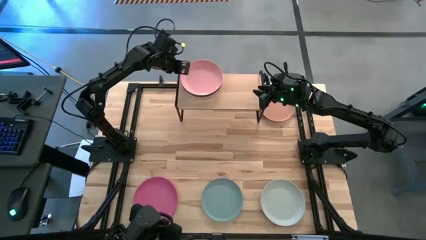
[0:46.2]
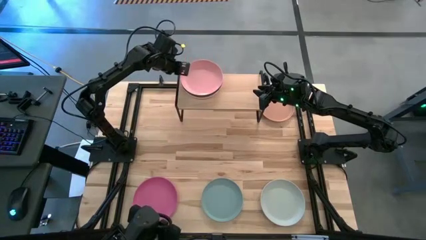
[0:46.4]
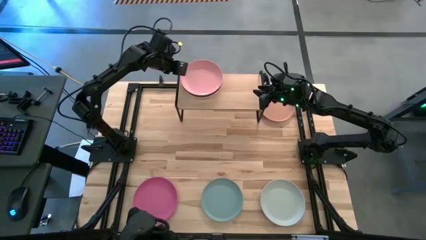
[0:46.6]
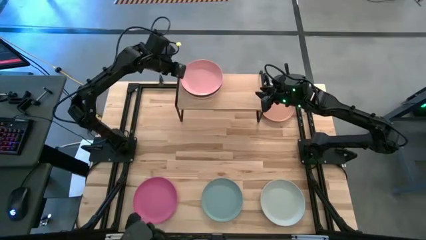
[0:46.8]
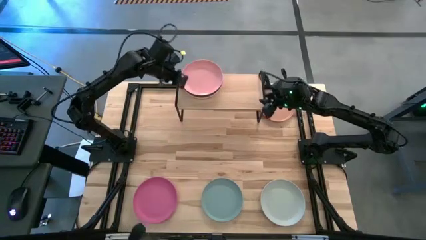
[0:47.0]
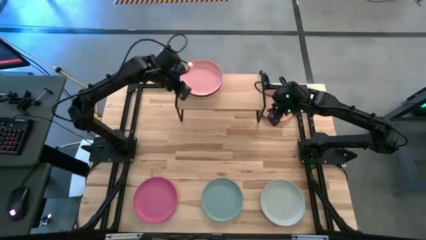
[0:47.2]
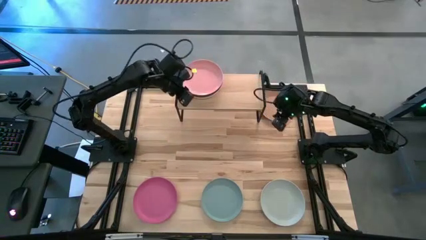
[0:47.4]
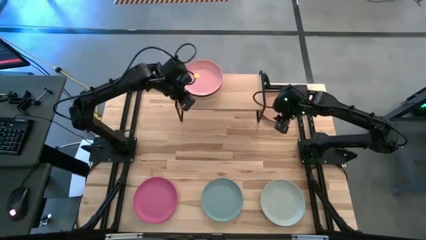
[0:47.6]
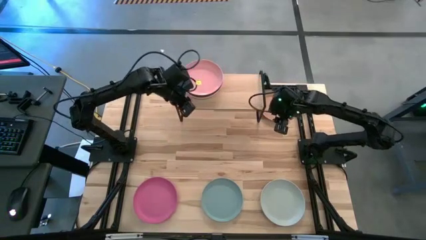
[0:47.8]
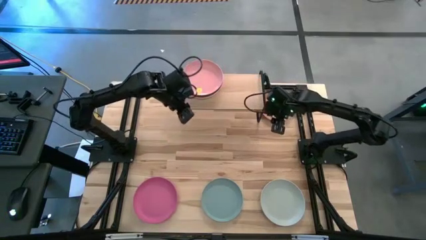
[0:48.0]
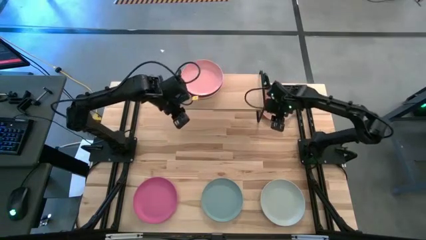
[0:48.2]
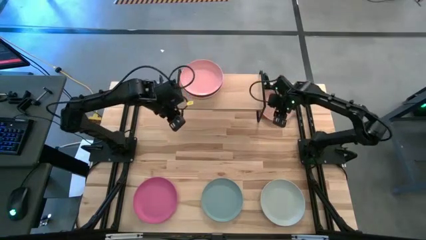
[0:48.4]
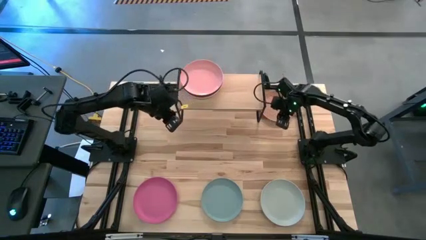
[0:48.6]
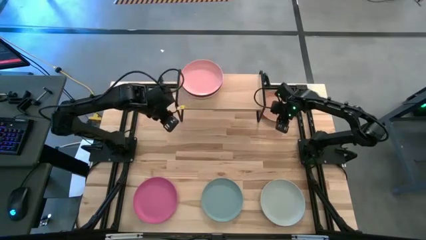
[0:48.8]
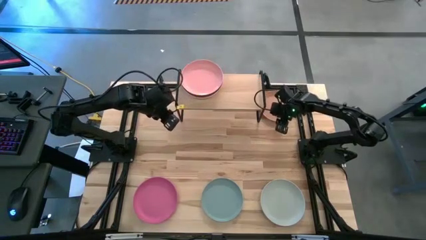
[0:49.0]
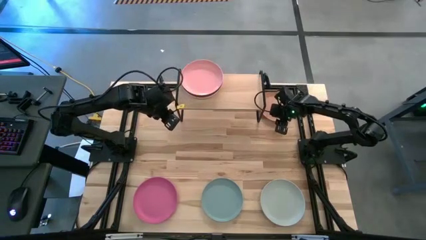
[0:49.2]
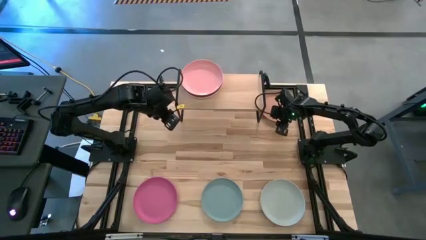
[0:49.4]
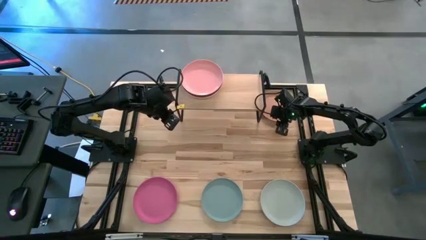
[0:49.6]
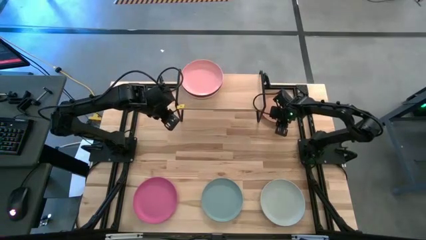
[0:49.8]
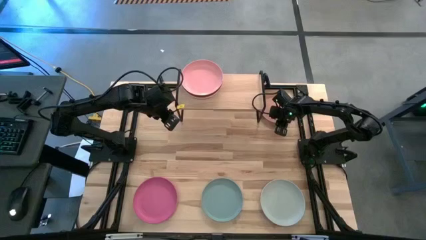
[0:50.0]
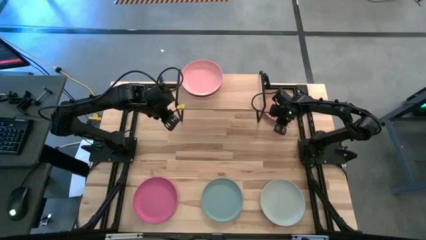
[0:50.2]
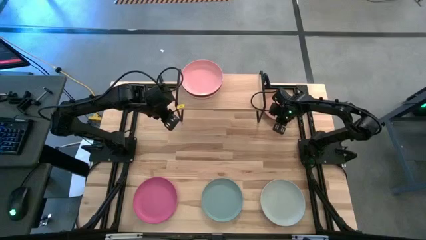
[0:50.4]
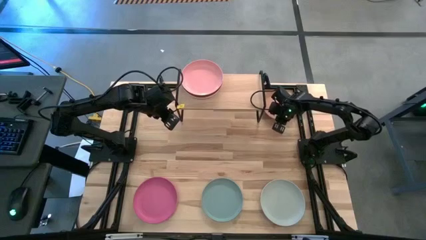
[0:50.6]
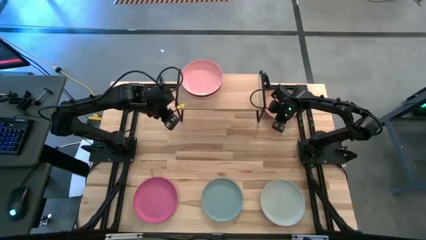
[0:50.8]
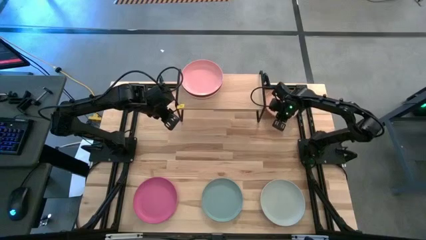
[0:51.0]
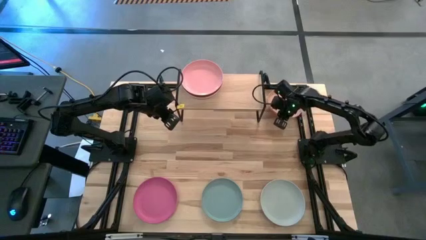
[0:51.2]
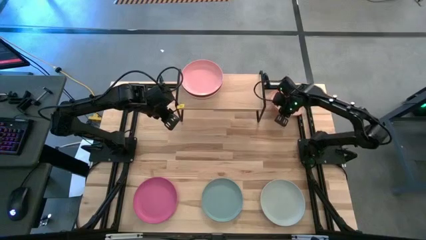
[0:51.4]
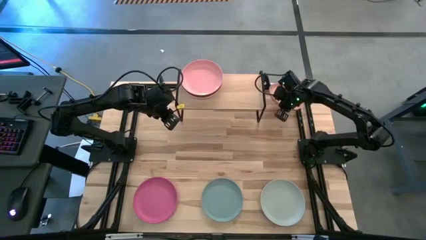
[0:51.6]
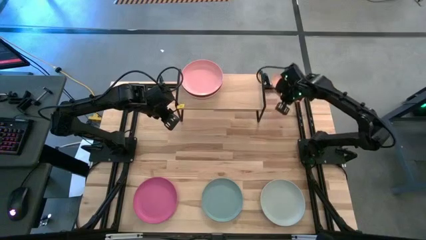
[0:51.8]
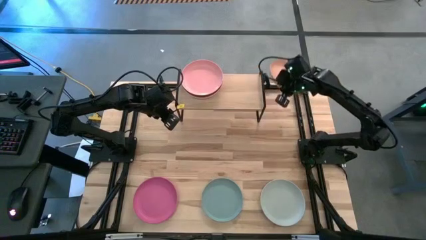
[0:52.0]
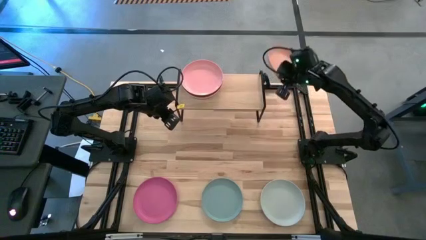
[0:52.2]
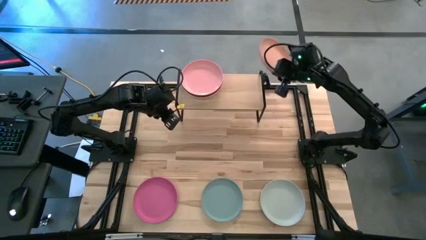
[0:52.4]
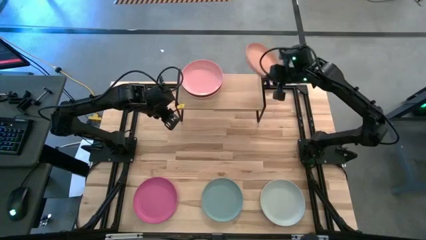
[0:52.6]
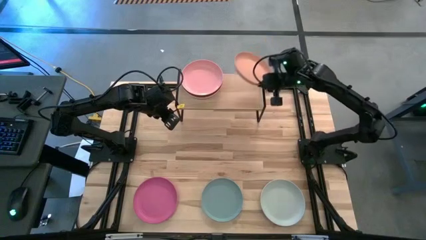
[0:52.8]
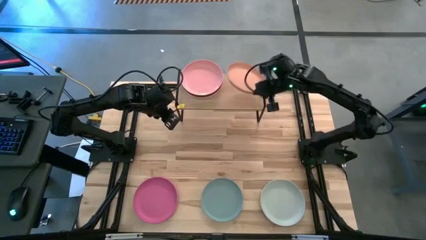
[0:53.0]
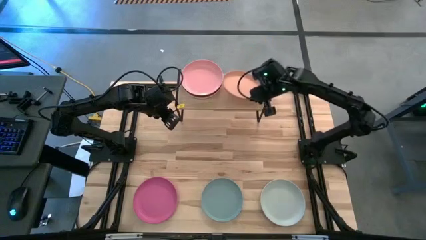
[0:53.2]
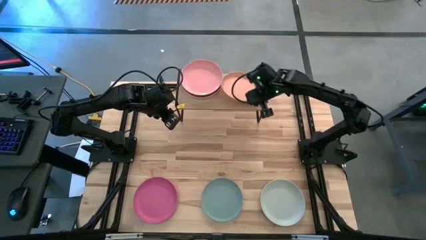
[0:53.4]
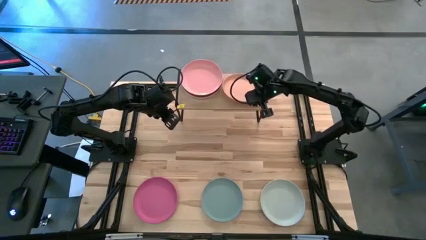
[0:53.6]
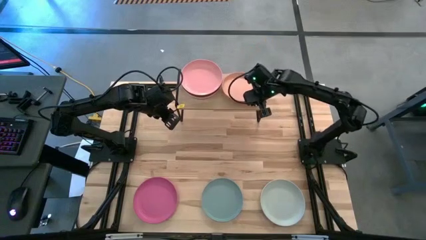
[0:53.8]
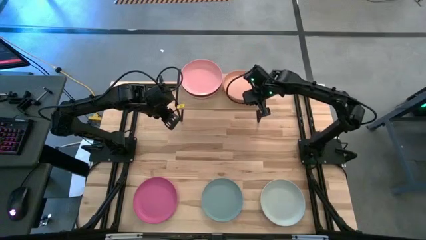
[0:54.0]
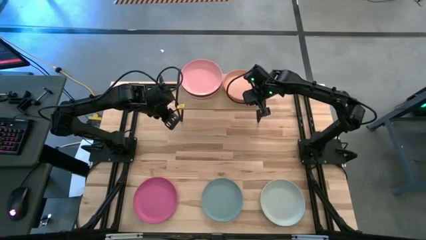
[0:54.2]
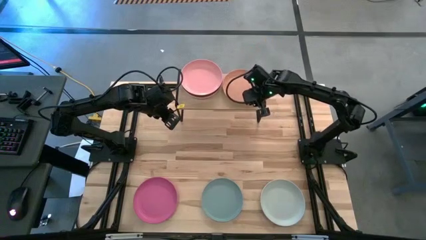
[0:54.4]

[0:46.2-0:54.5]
Task: Place and stack plates onto a shelf
Put the brown plate on the shelf

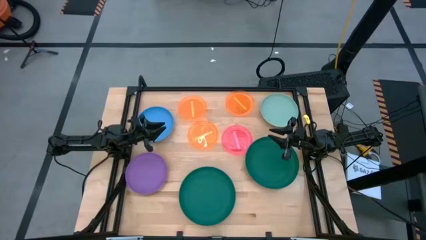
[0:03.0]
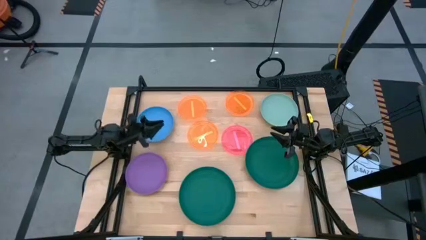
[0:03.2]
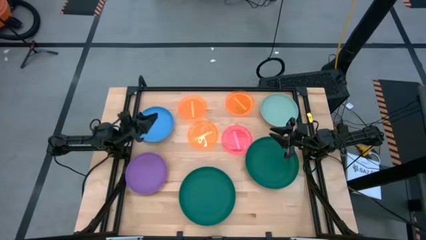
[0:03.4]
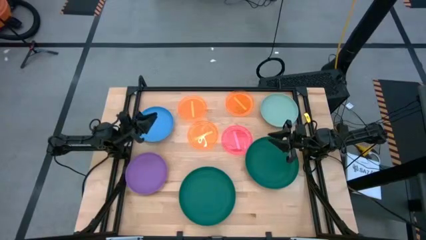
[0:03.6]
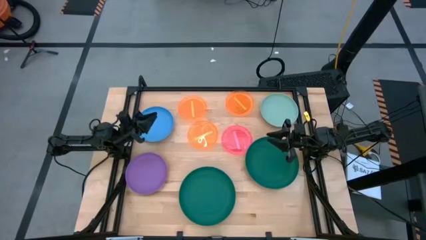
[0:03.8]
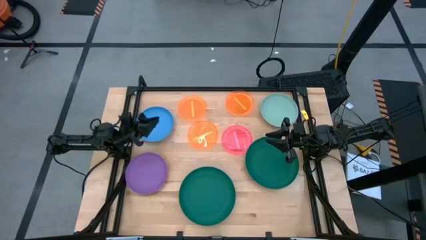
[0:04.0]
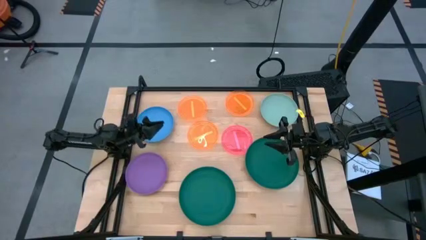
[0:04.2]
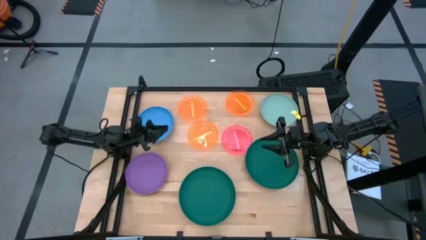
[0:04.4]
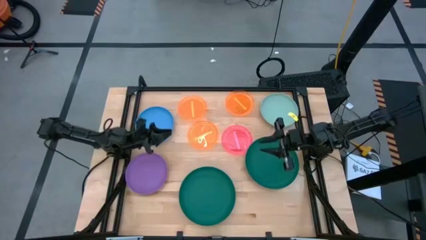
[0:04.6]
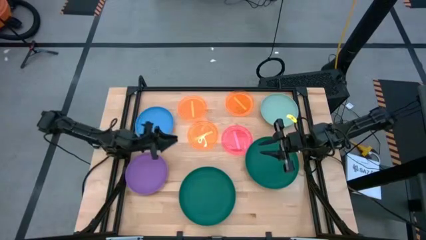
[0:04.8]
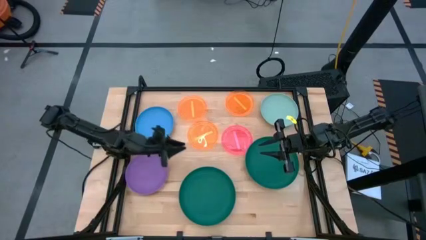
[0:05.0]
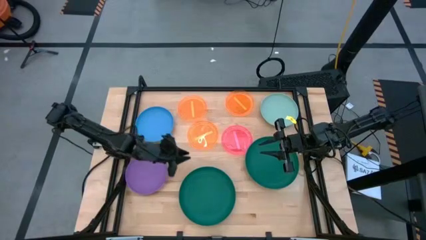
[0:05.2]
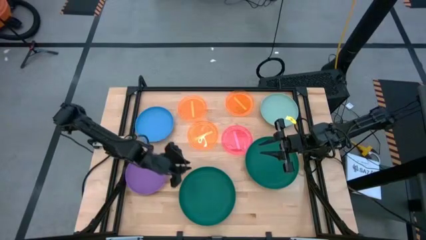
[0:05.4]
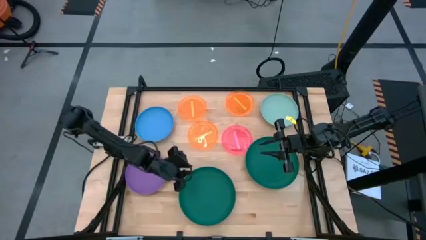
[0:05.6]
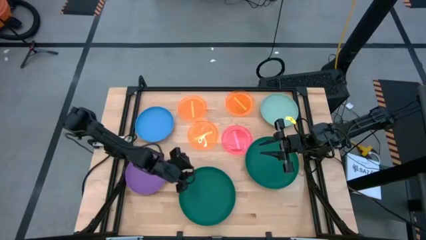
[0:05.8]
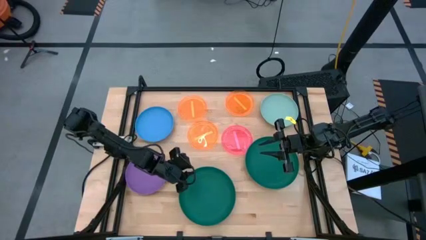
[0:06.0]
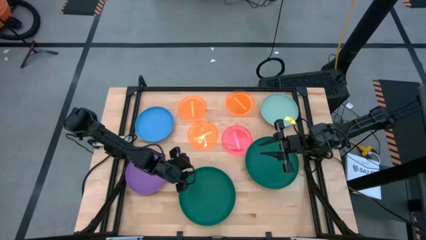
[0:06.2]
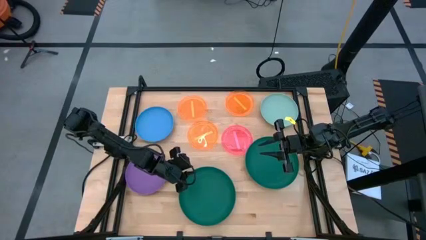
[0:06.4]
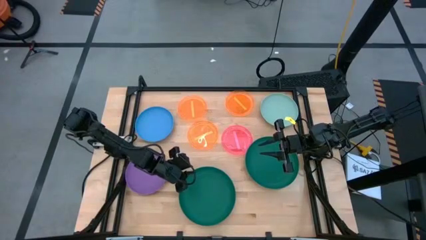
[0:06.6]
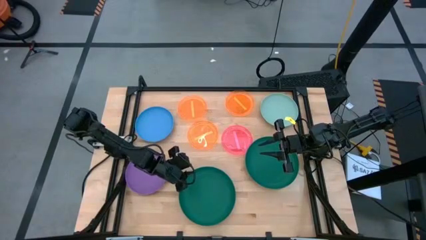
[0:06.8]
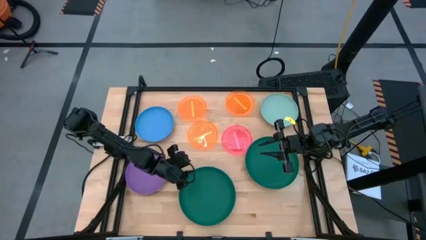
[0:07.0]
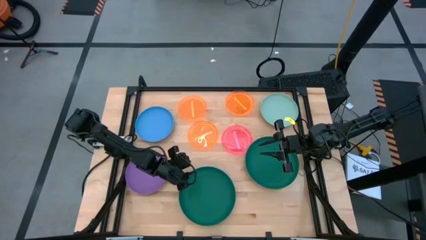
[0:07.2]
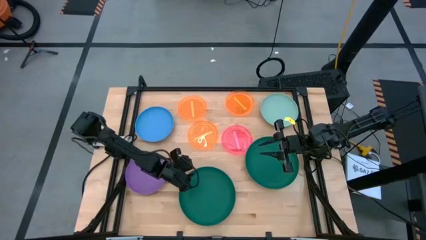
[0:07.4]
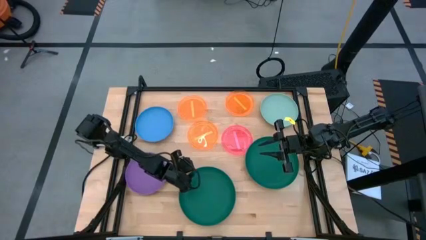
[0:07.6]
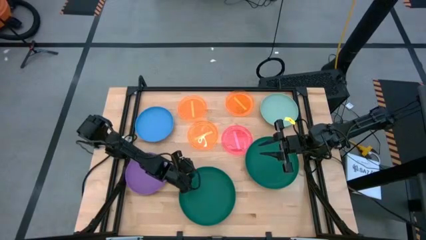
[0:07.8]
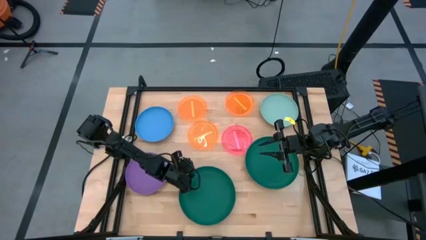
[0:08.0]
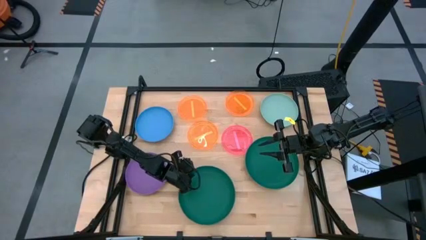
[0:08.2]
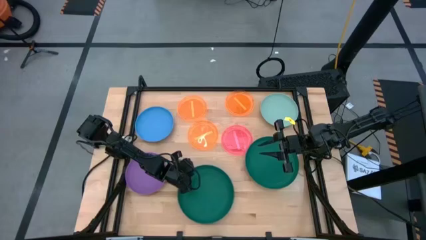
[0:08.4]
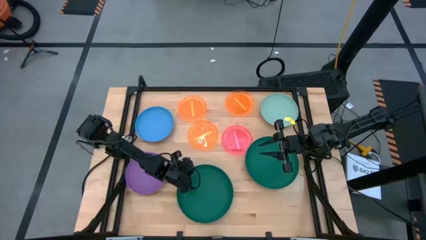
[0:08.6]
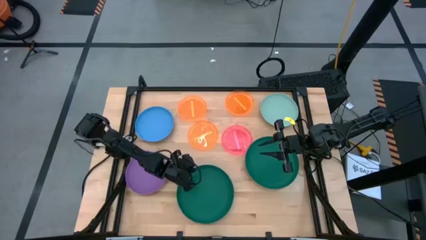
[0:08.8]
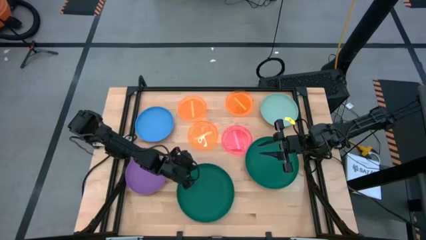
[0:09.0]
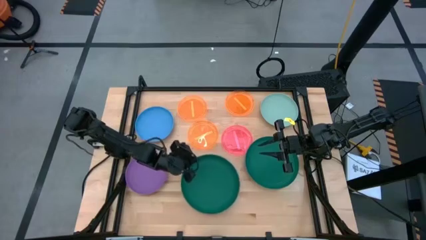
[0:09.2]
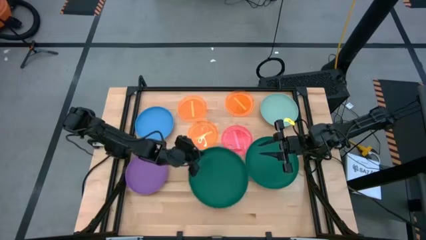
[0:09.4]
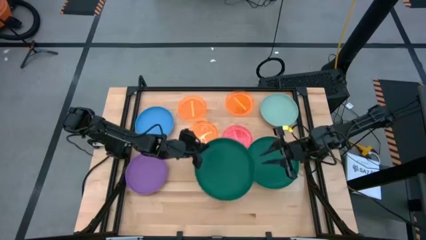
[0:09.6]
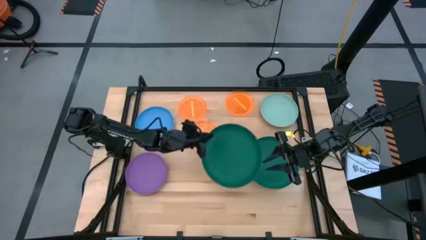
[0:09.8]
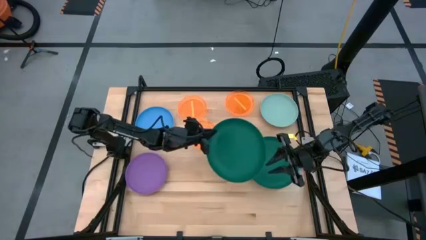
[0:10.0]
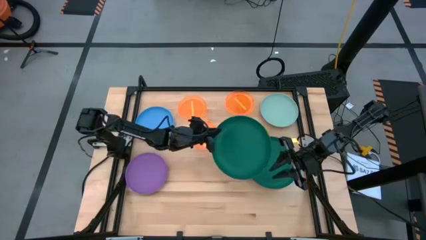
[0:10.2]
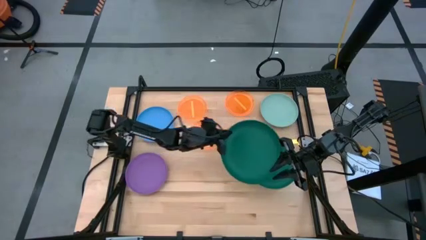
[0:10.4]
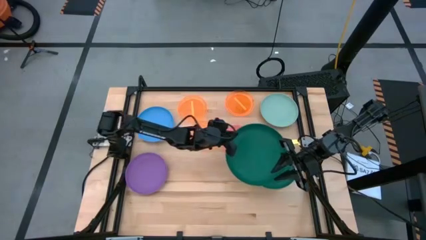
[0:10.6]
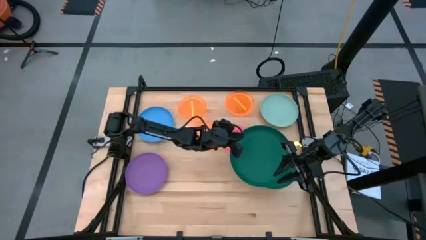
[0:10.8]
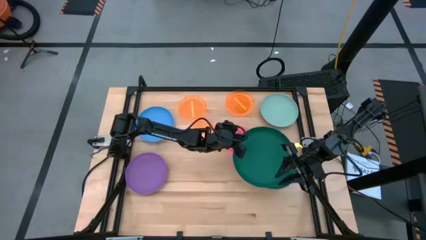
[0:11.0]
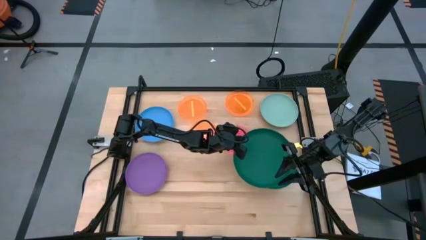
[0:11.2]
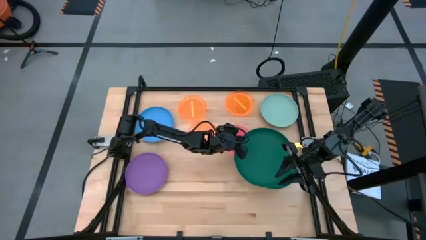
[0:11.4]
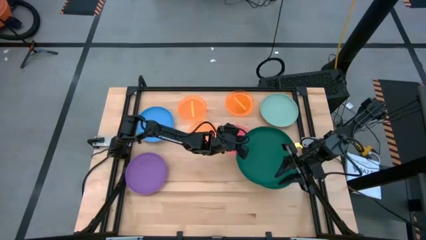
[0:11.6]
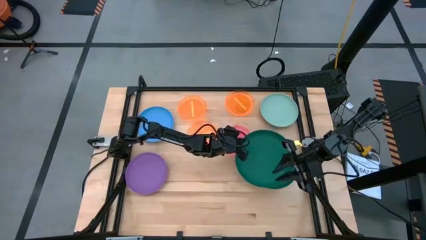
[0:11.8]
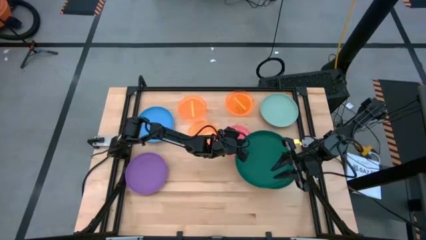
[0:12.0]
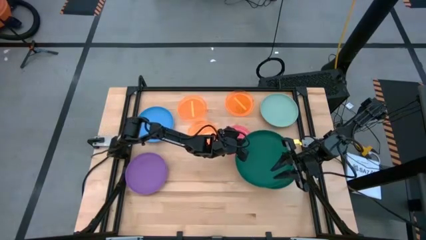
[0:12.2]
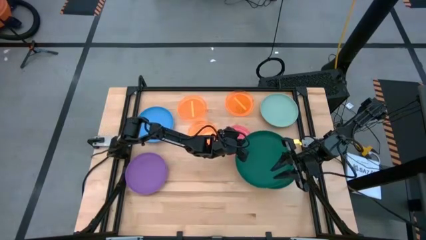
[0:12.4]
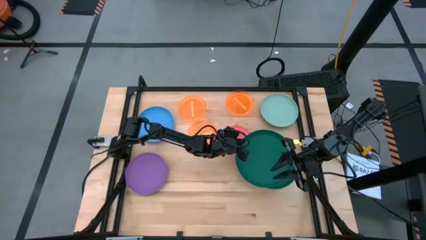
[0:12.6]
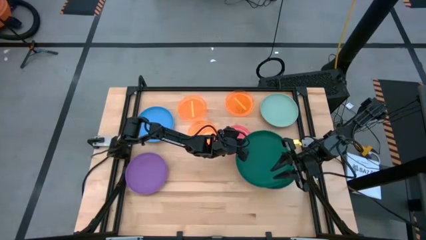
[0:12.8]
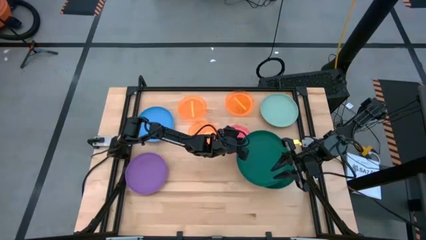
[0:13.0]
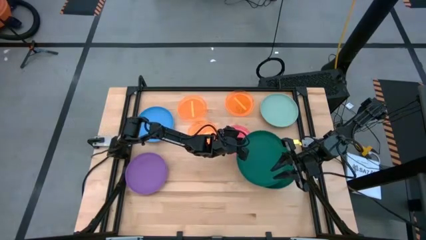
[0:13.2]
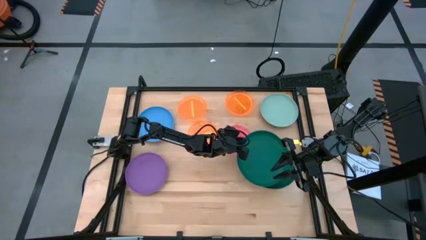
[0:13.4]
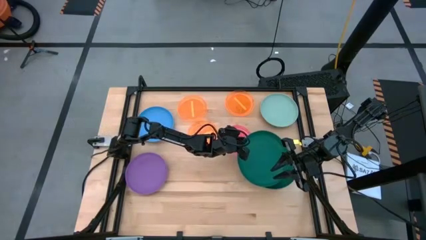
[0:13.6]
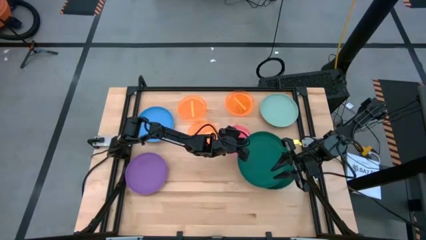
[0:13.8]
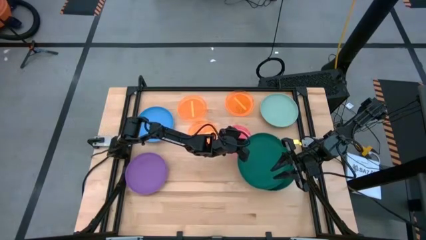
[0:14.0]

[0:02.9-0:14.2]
Task: Stack plastic plates
Stack the big left green plate on top of the big right green plate
